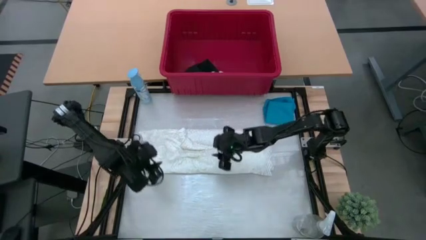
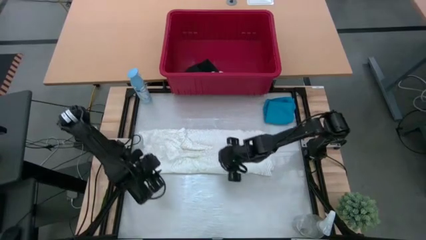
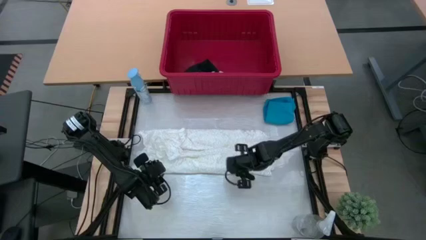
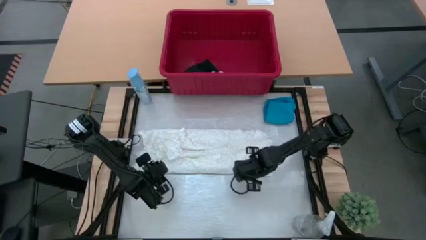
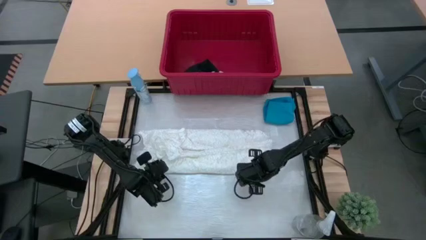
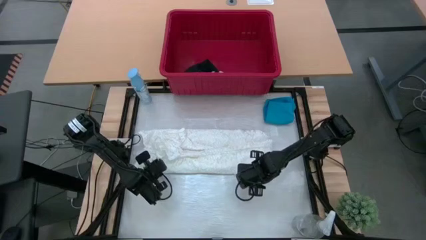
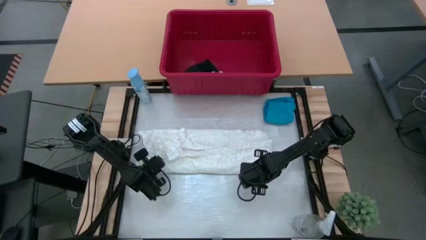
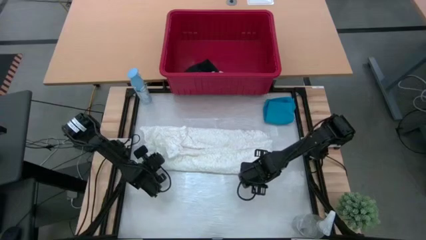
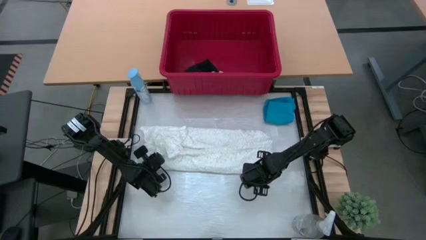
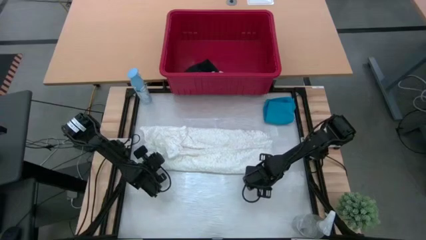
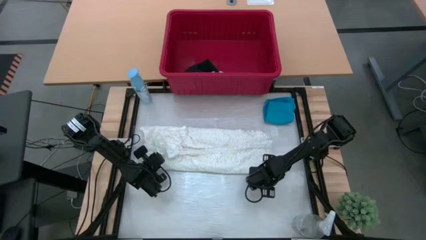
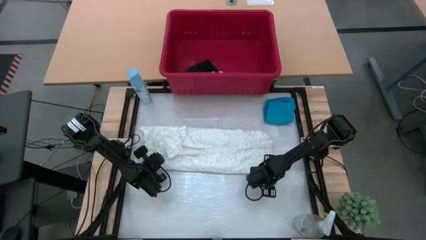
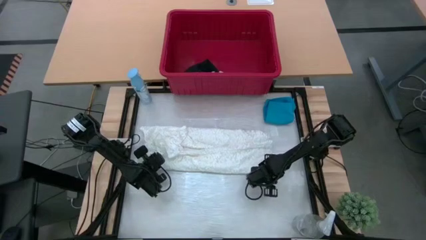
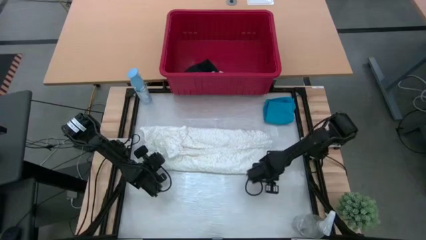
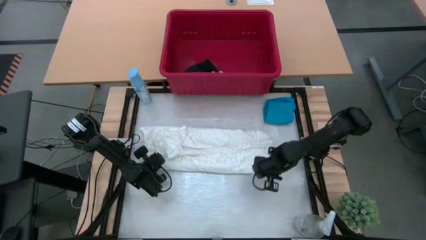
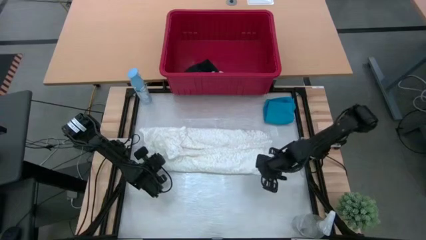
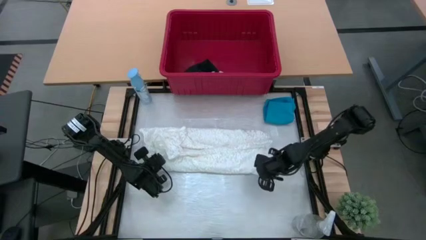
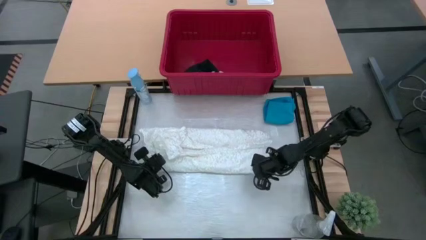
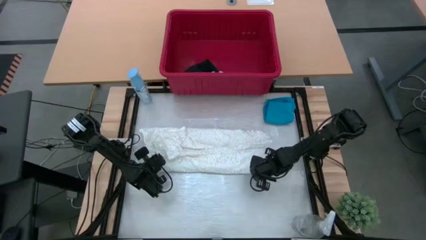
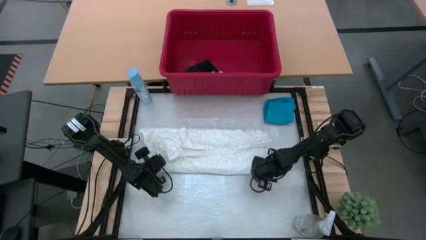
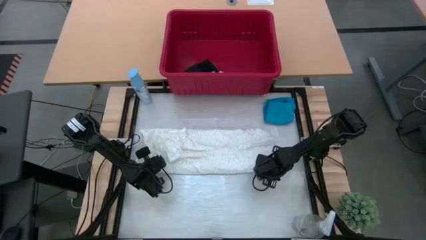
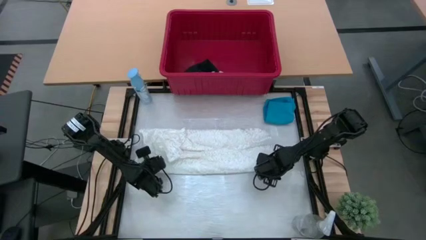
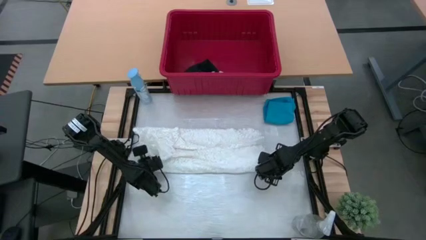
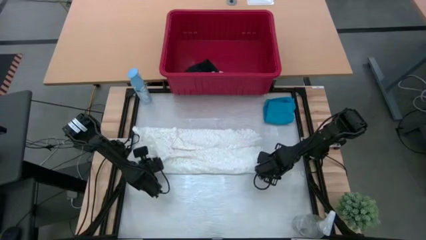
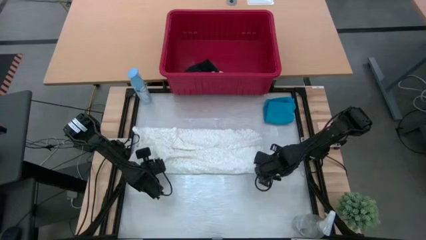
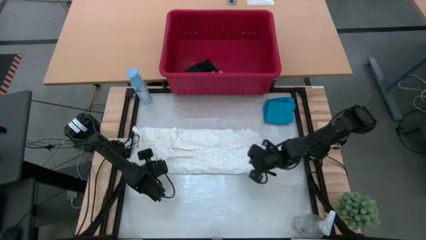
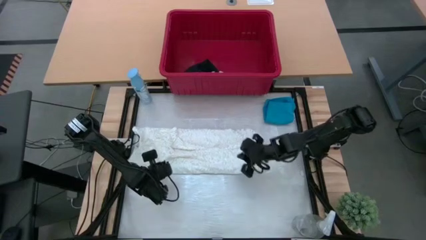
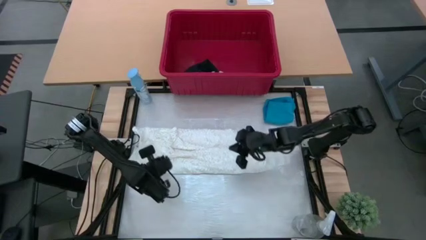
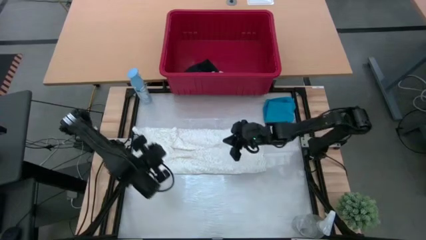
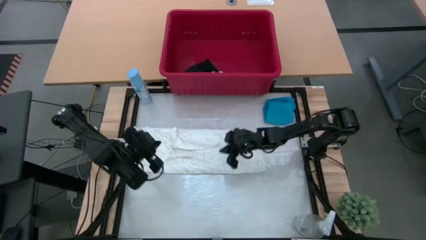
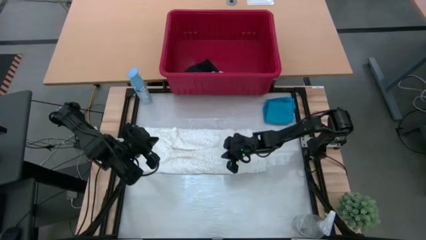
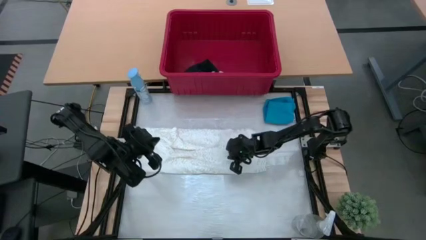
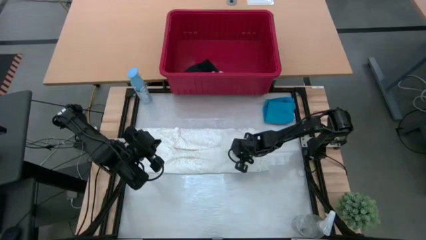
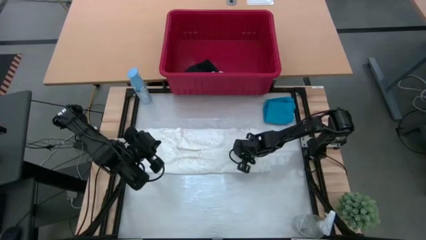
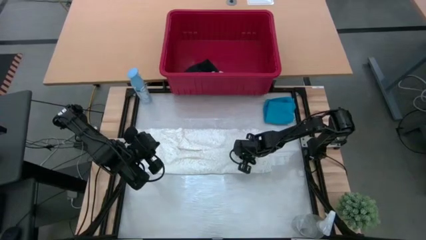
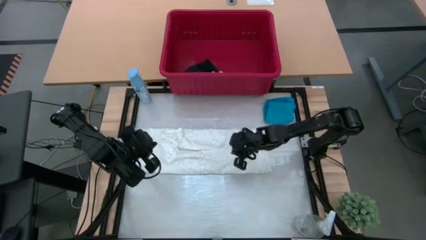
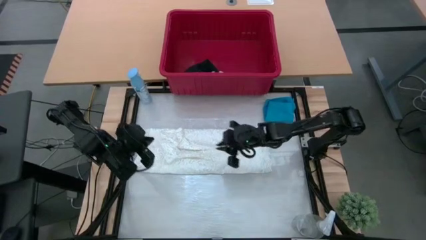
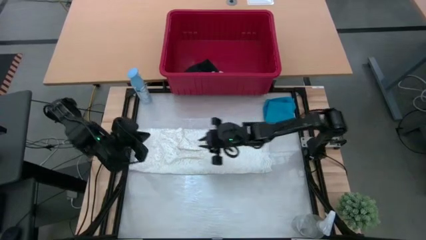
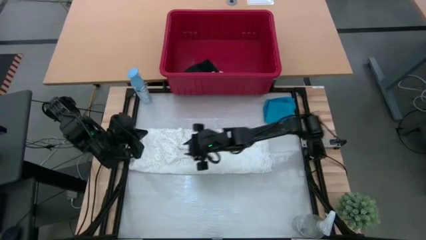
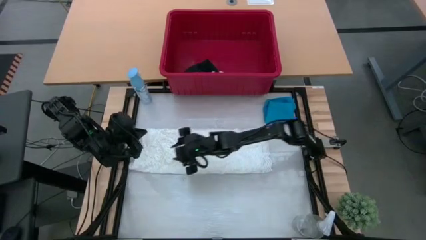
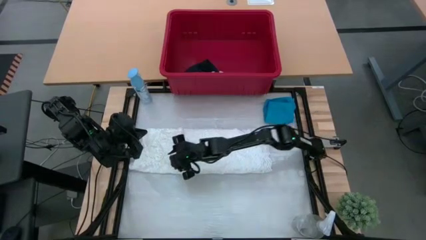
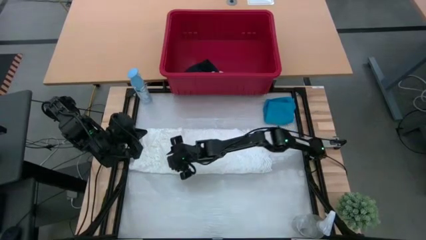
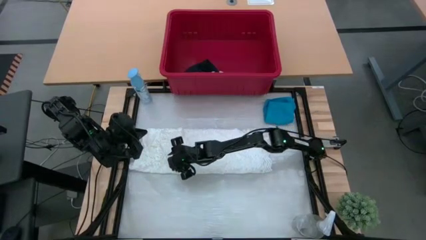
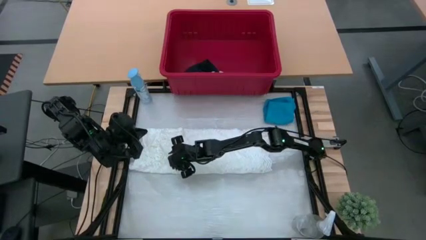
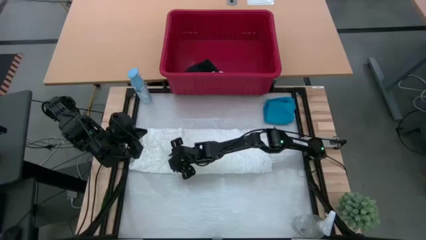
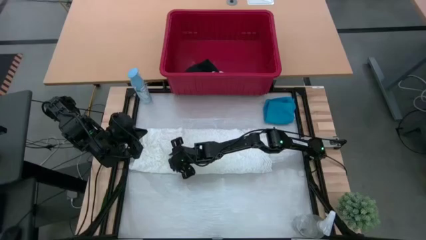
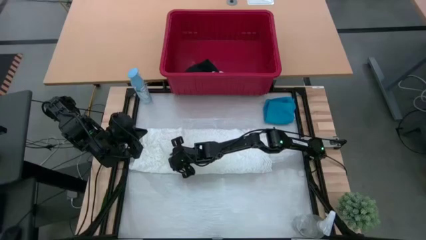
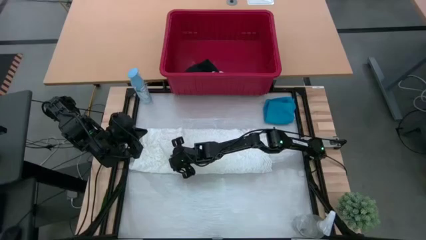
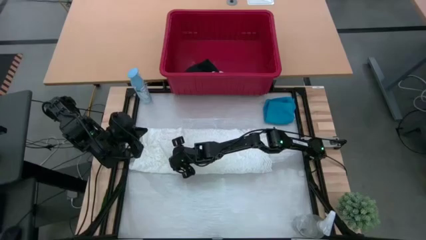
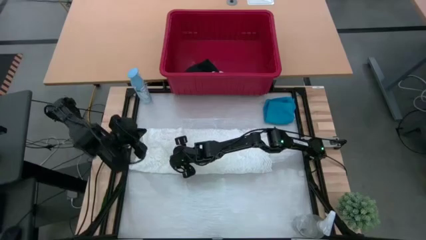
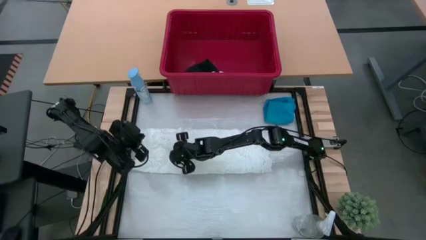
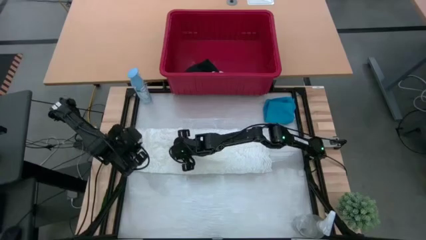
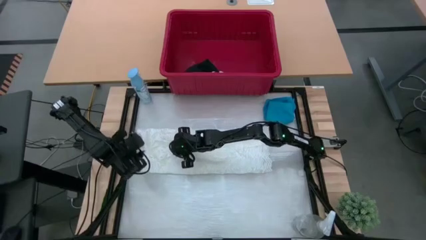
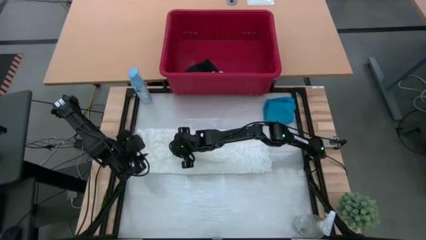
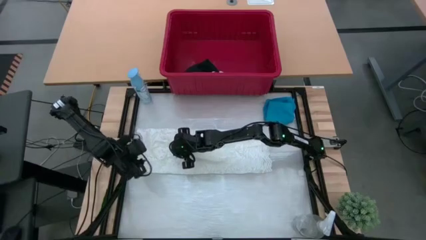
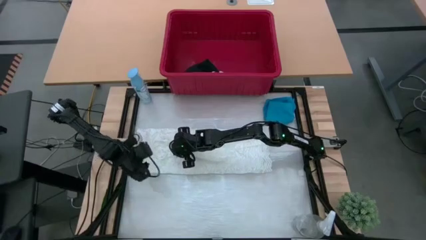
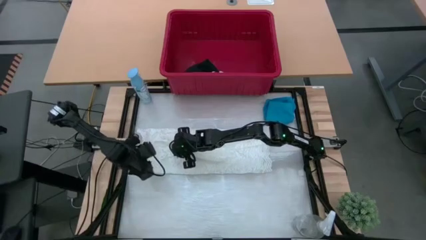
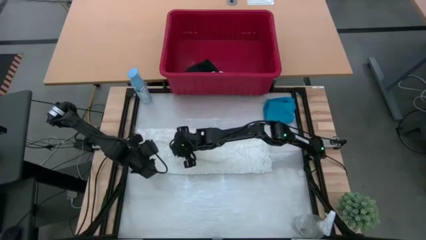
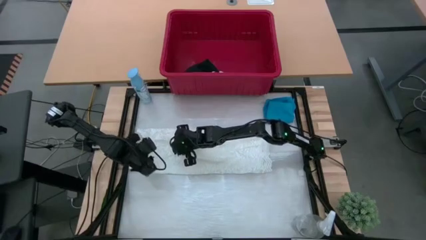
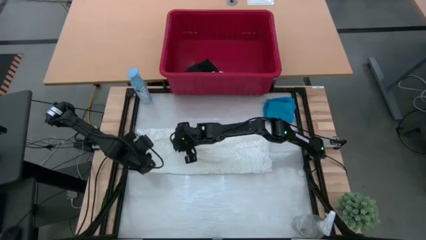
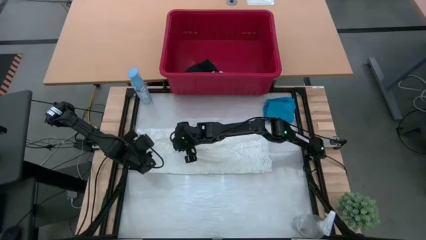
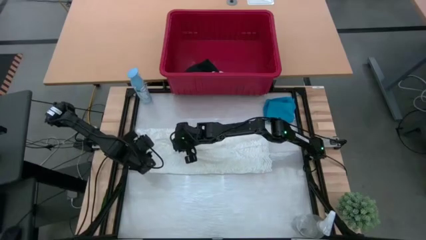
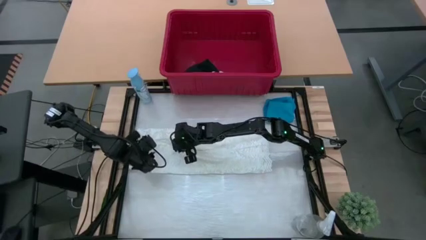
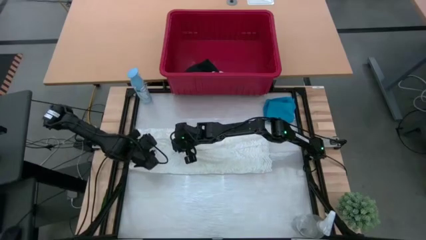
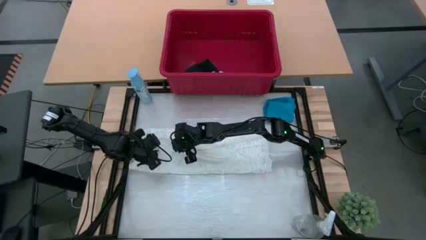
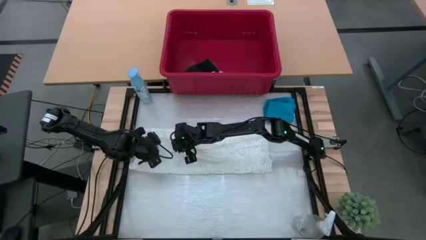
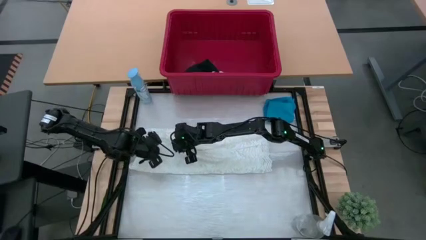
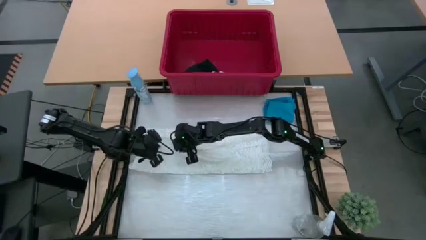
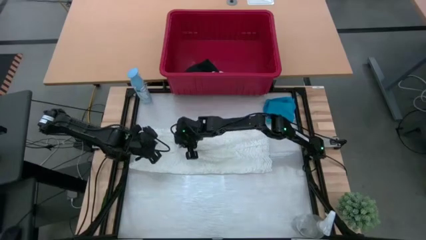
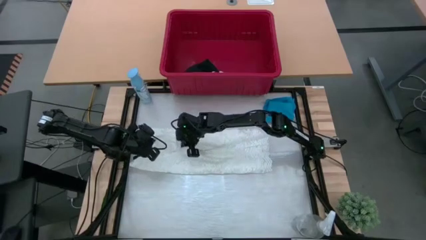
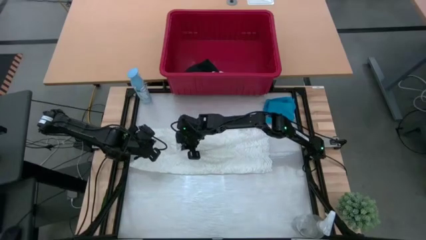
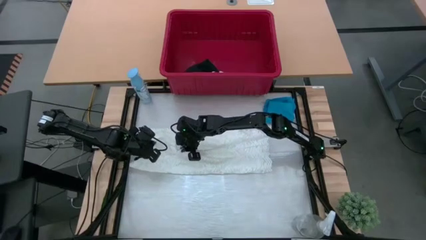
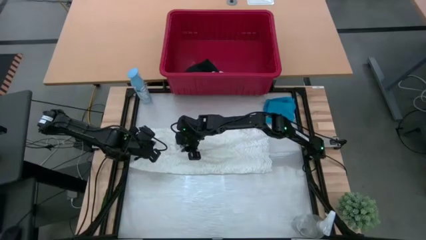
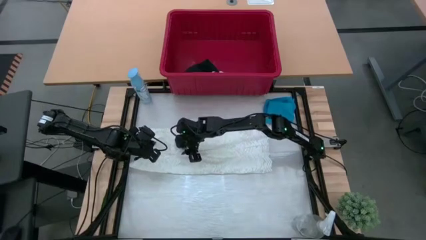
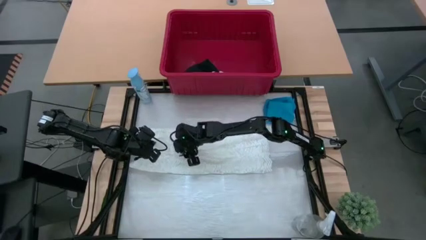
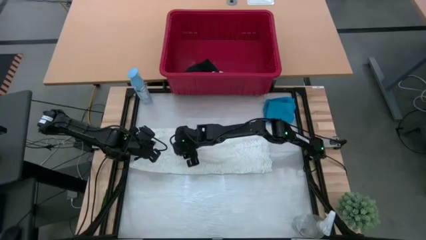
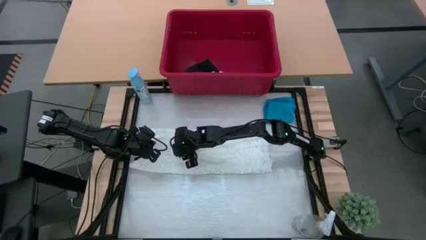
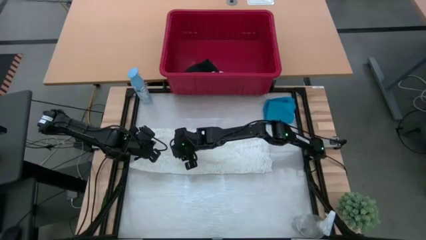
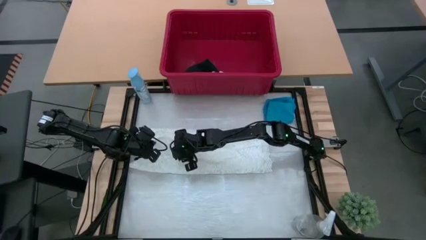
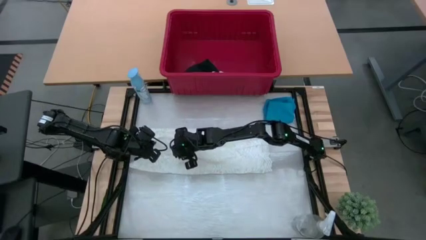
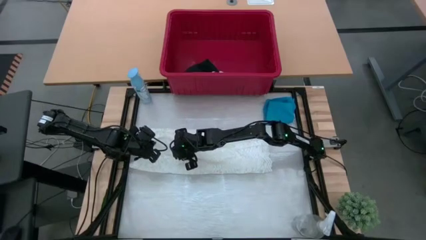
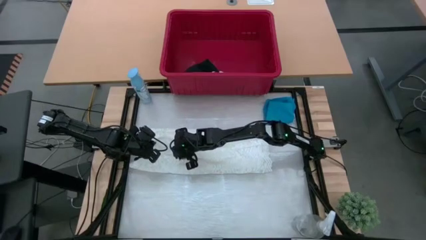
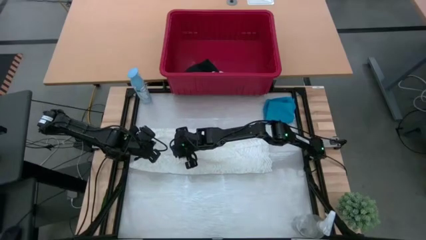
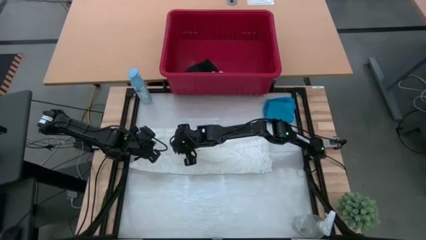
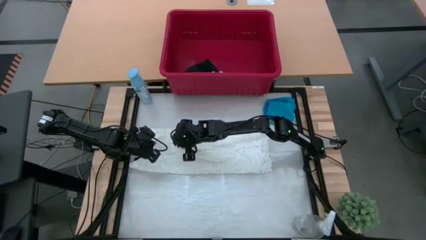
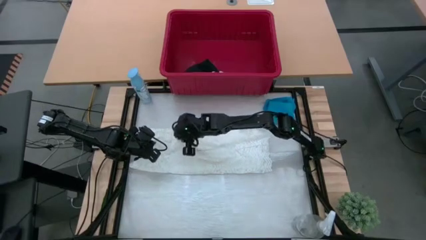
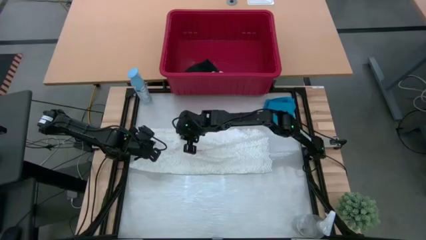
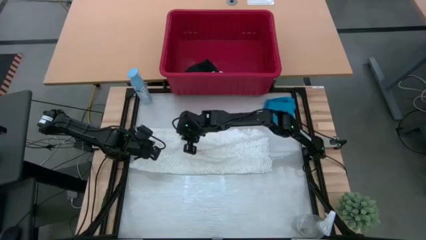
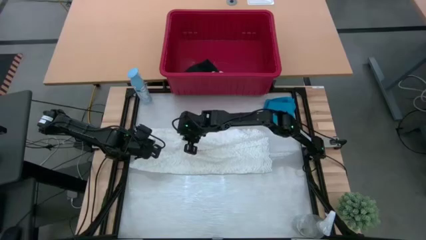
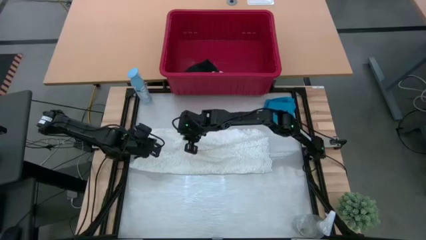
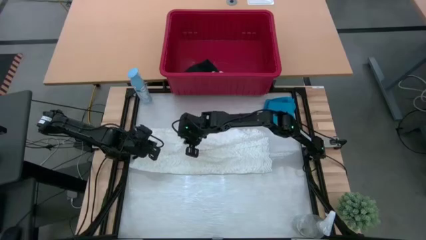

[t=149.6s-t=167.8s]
Task: Fold laundry
Fold the white blouse
